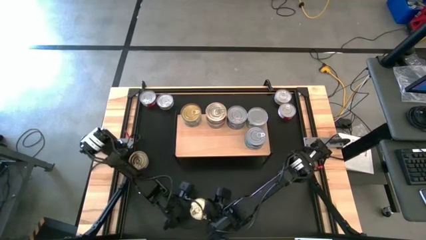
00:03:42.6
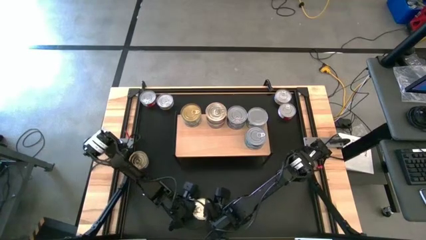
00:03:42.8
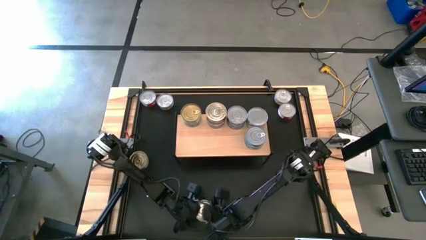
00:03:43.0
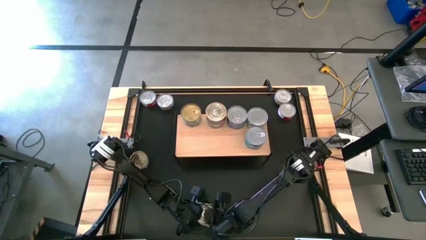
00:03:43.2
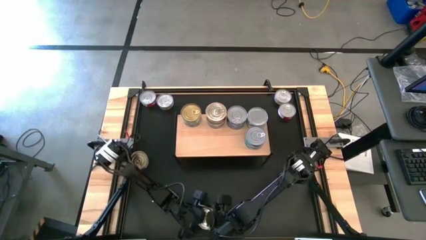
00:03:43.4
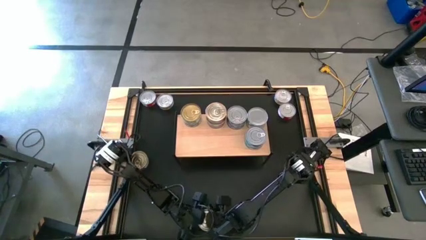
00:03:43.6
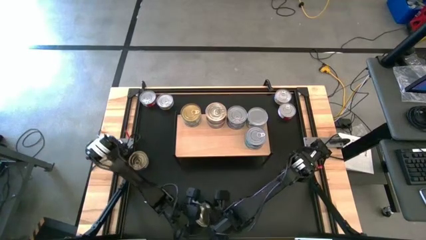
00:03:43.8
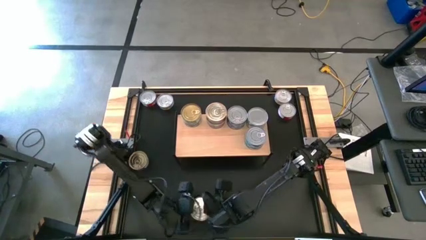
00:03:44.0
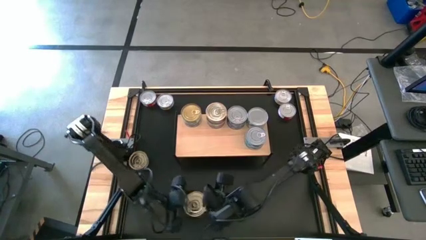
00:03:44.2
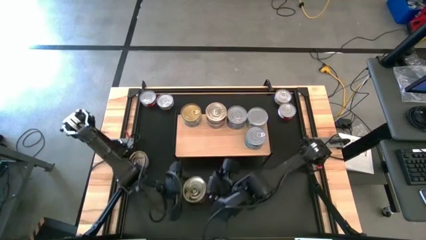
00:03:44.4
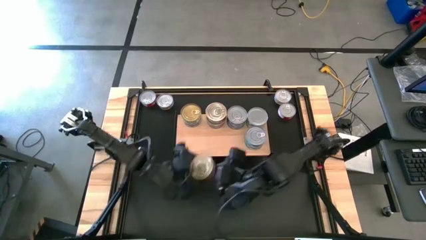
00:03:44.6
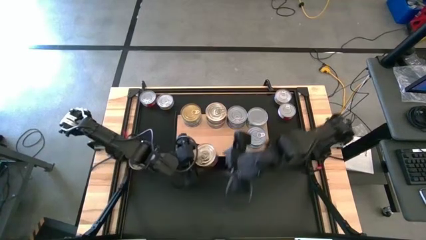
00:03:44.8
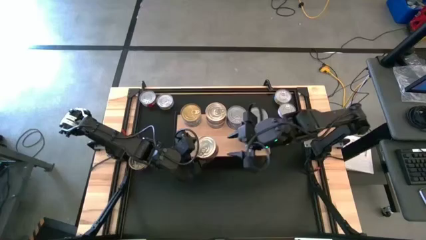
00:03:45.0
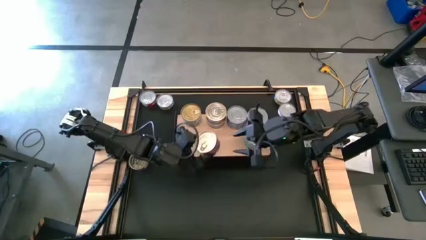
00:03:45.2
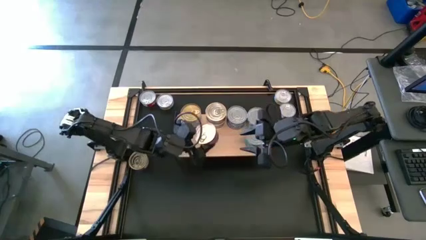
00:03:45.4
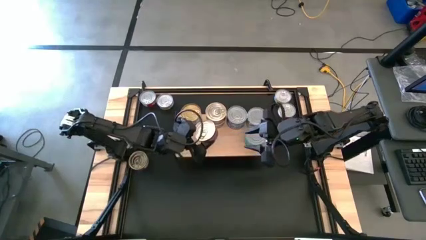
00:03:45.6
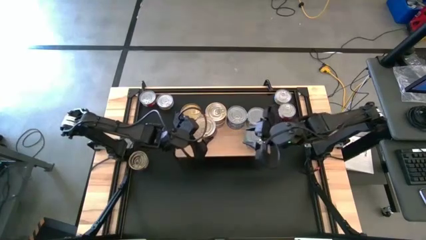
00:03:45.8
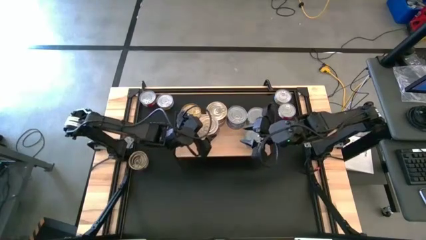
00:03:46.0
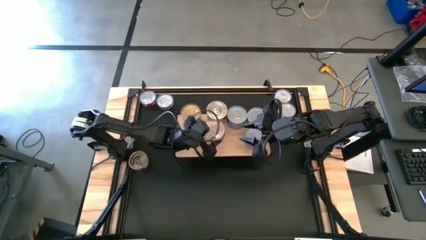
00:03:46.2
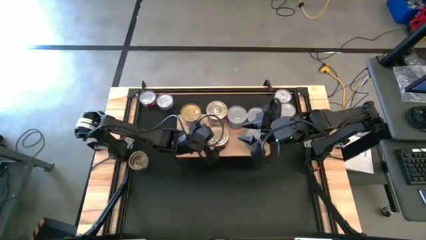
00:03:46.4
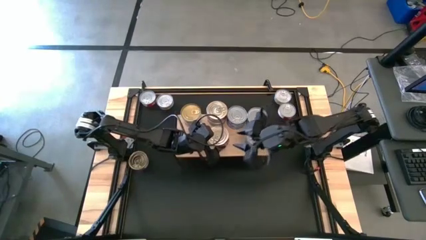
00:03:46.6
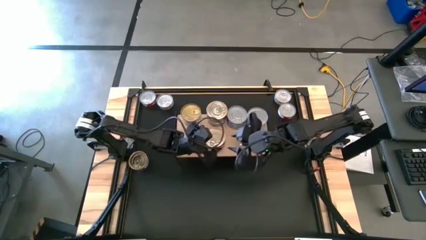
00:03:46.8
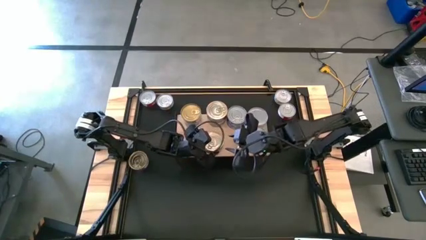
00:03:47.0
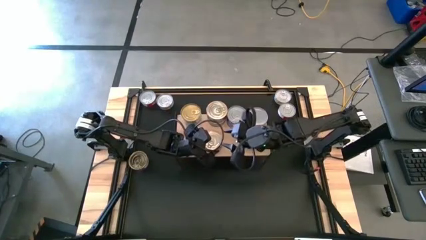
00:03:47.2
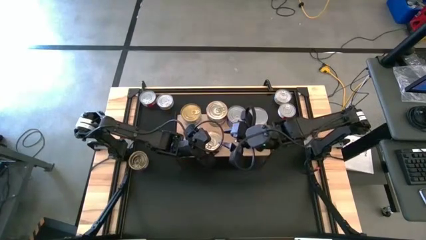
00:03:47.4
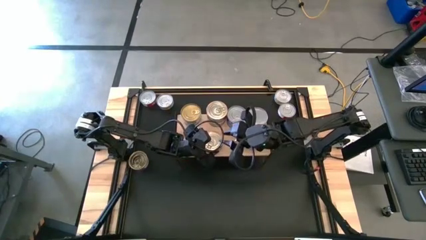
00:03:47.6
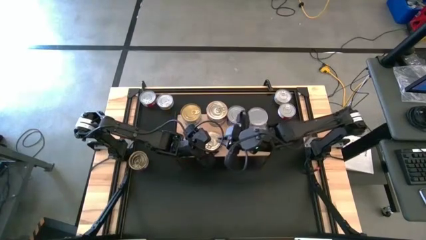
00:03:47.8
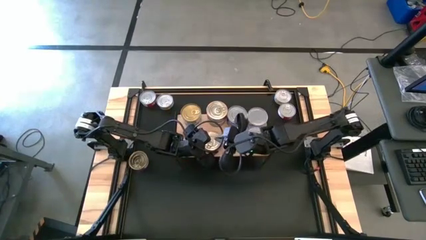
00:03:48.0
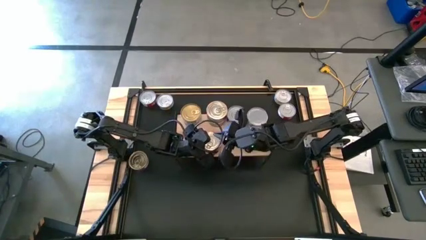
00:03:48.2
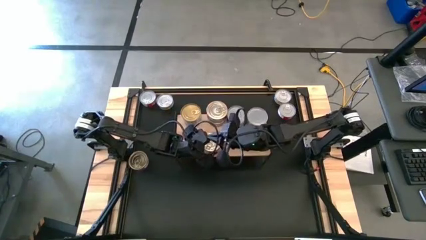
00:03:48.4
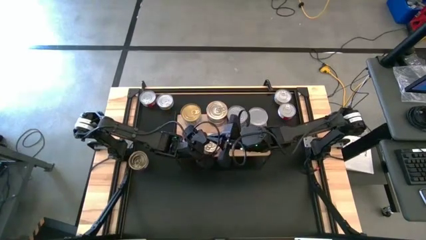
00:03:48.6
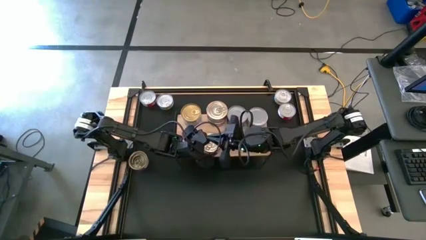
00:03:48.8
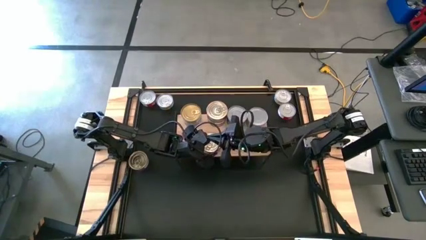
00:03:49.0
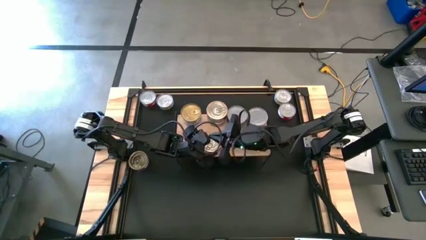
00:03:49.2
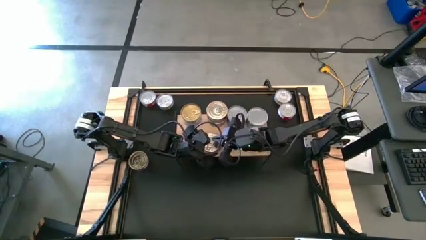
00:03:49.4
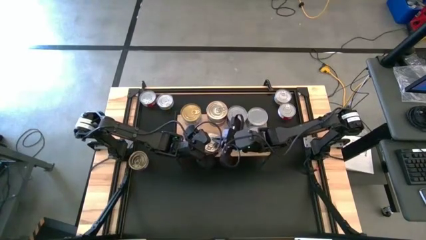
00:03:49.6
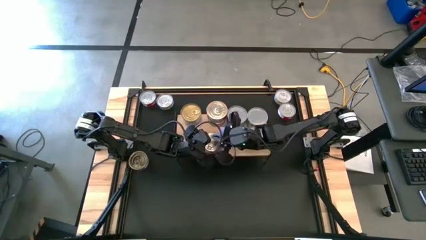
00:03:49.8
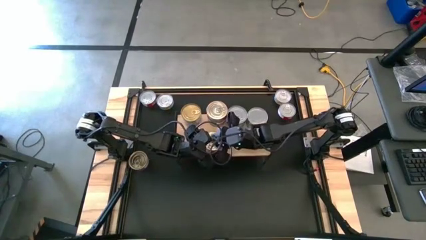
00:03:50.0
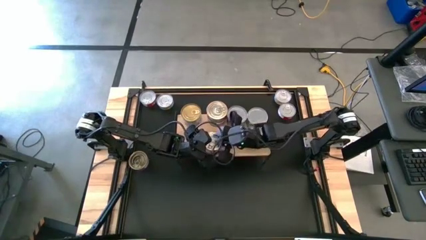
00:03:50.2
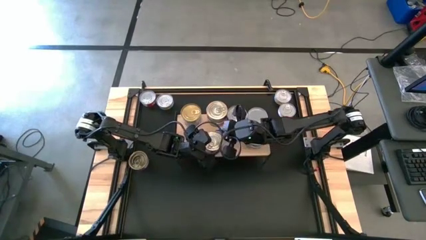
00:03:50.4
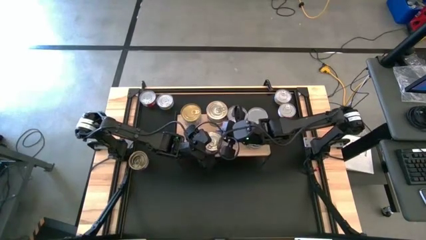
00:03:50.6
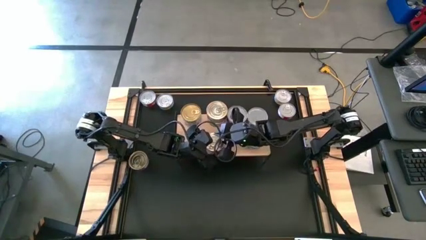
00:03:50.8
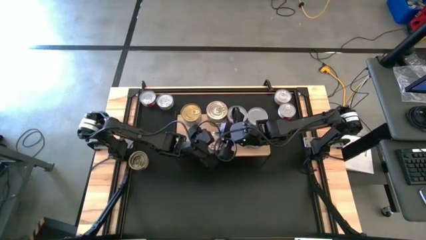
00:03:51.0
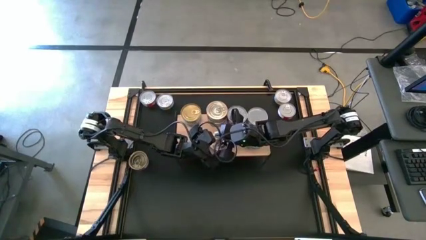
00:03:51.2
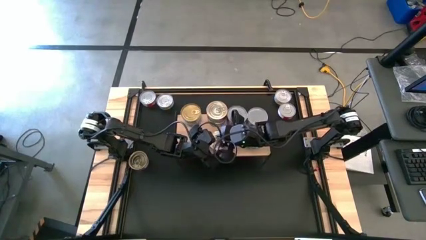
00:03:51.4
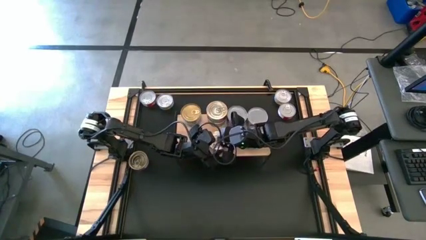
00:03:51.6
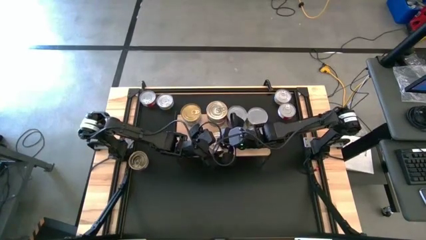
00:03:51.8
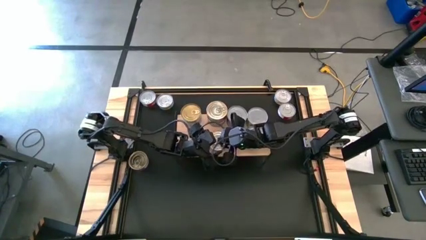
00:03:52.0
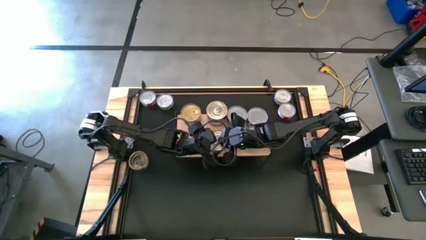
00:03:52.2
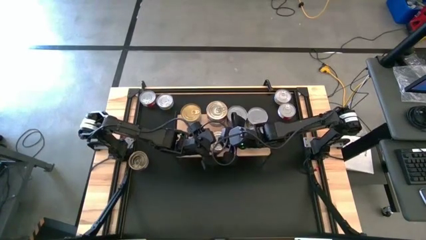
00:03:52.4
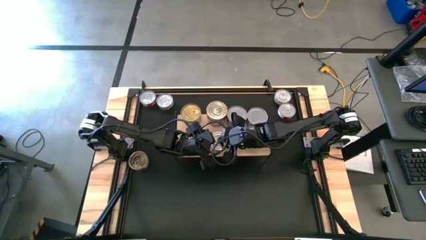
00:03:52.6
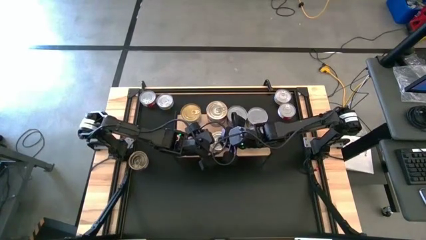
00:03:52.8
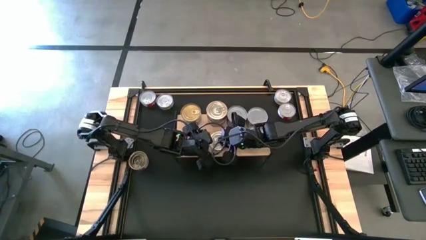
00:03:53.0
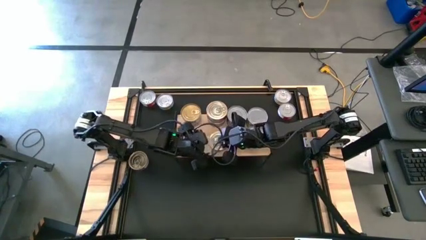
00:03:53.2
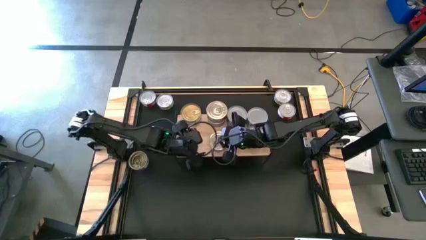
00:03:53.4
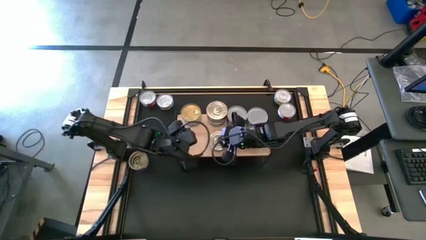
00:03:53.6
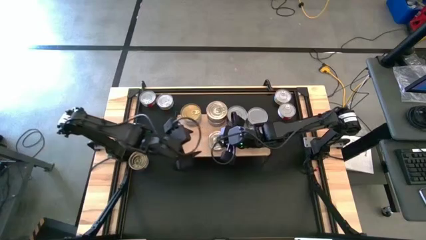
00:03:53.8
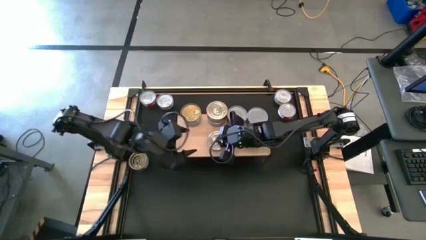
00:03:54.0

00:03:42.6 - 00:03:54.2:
Task: Stack canned seafood by type on shelf
Put the blue pink tuna can on the shelf

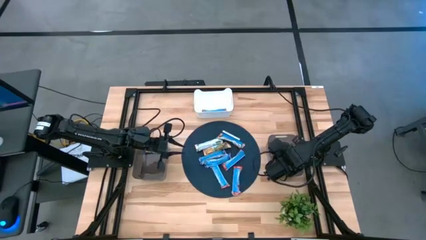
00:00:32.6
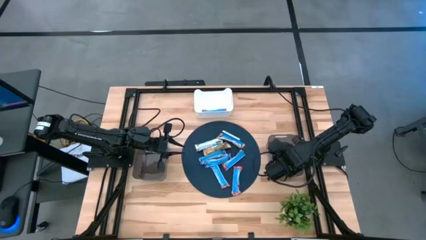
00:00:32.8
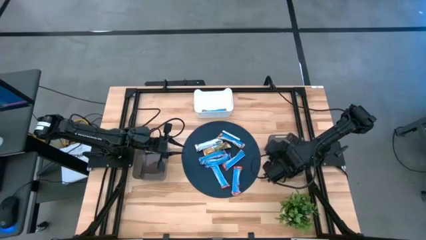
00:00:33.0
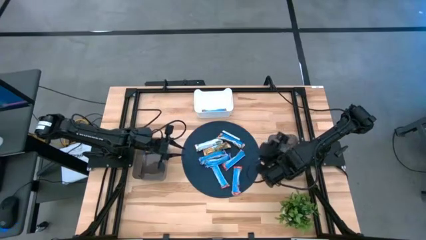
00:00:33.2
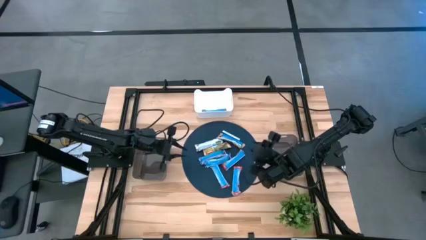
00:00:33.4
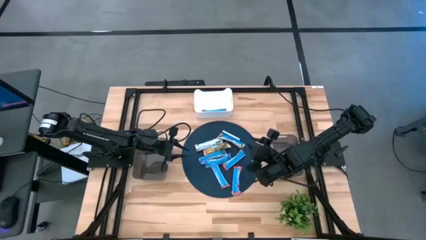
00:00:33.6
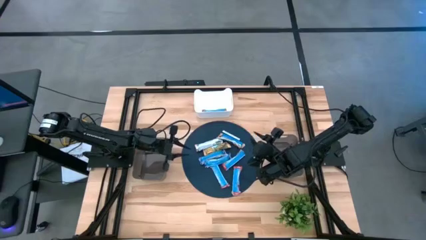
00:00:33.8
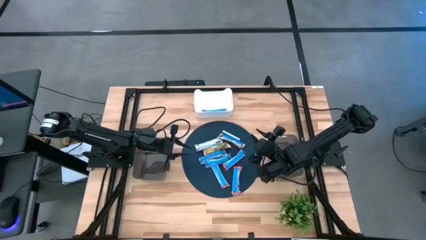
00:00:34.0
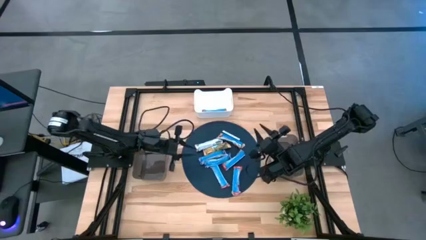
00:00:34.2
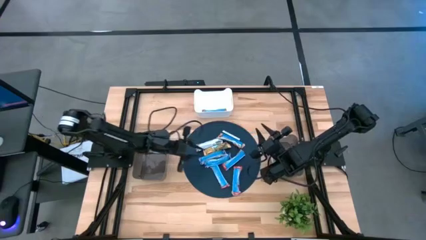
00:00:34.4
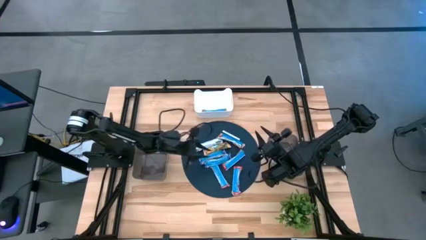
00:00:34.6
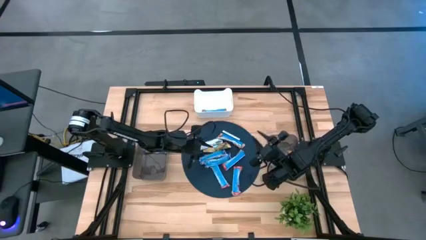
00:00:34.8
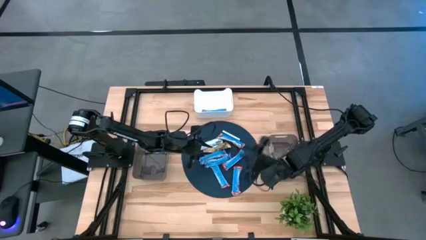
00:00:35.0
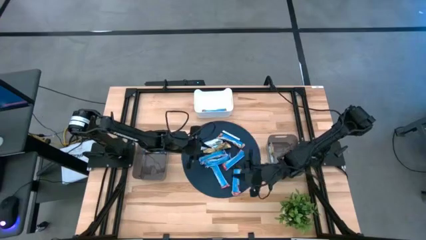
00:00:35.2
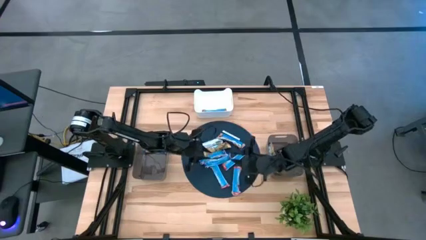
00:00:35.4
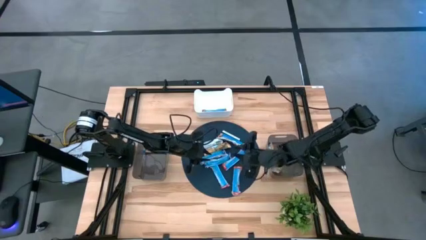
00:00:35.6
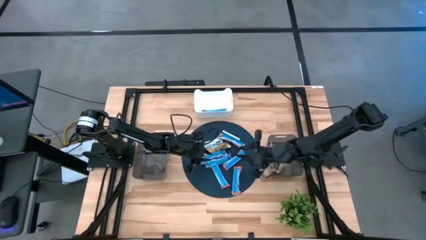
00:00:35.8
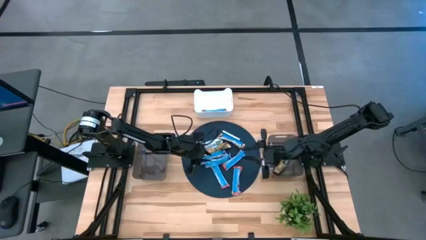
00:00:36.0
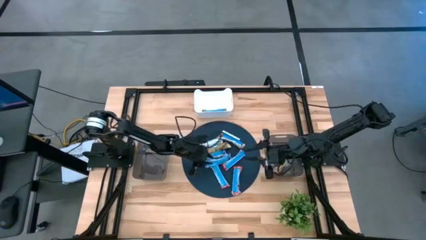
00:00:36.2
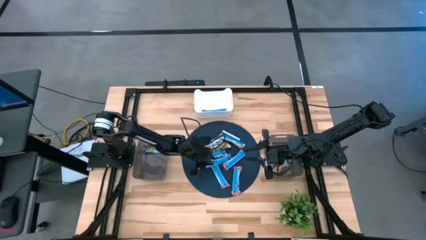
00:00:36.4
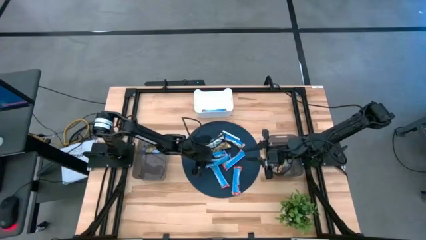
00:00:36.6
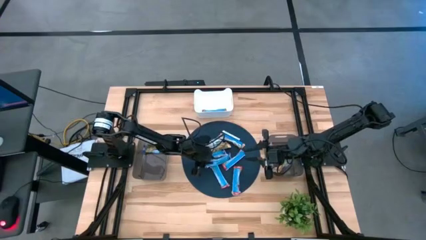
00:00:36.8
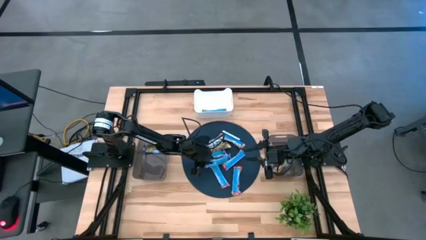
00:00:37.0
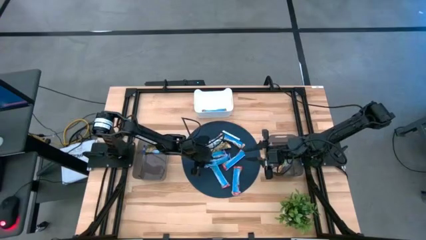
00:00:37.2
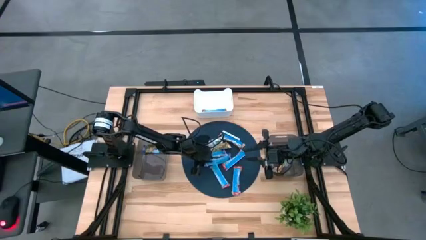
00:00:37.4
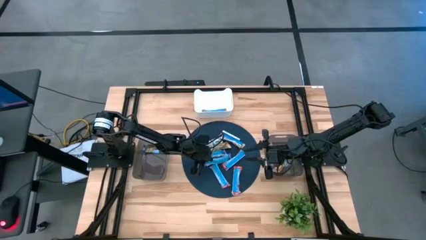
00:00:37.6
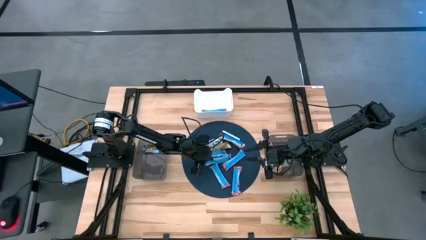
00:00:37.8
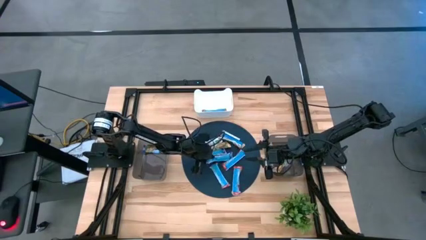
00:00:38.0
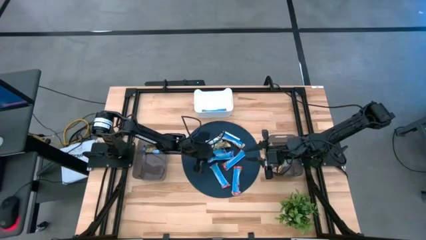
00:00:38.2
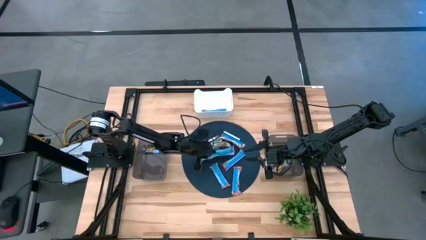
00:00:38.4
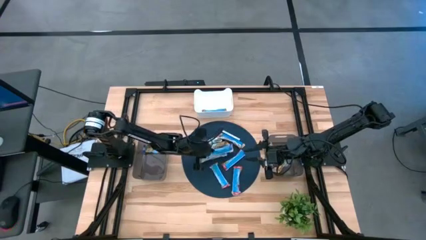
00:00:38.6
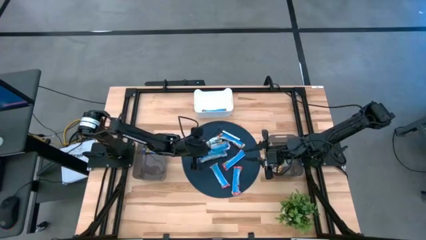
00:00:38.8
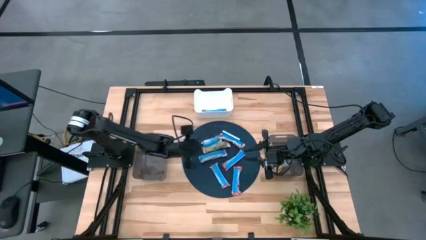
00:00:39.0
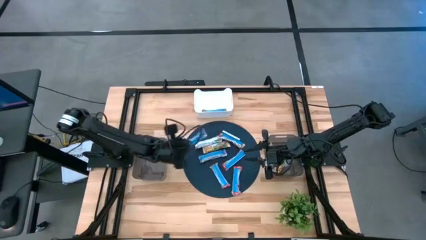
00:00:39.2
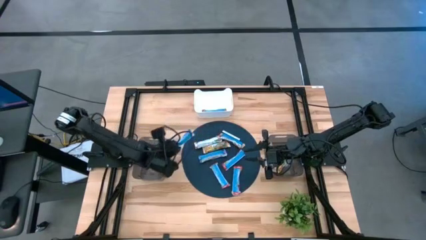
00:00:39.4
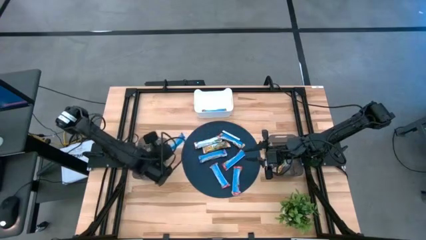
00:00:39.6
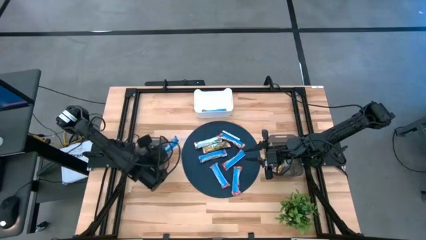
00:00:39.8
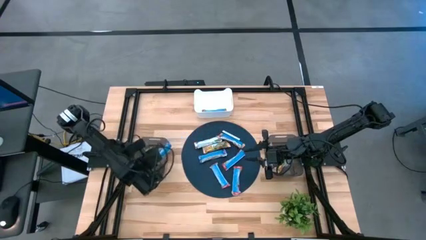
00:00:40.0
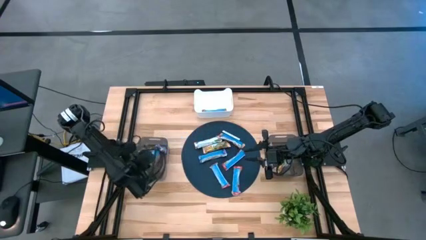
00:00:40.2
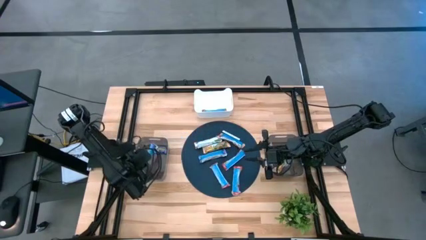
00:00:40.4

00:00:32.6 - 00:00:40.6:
Task: Pick and place Granola Bars by type
Put the blue granola bar into the left black bin
